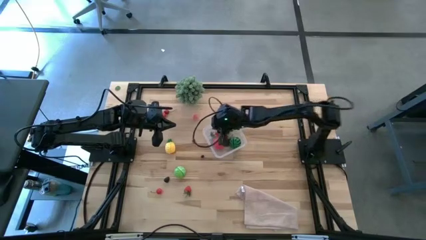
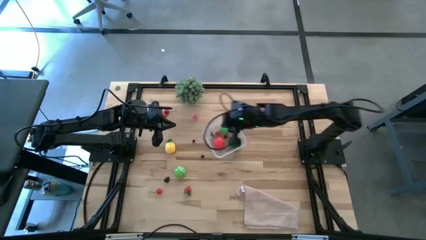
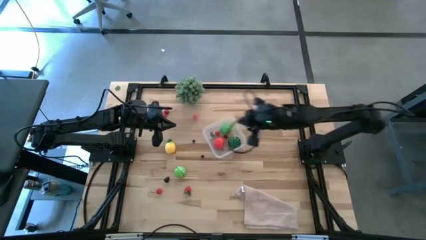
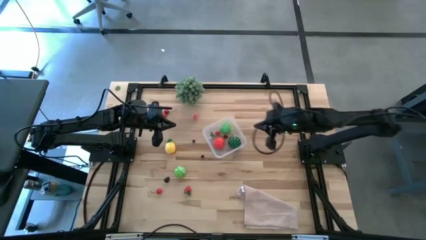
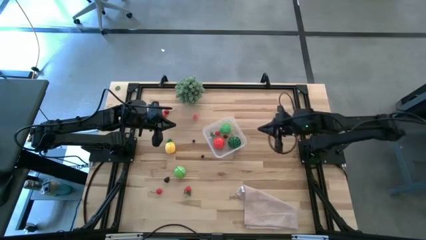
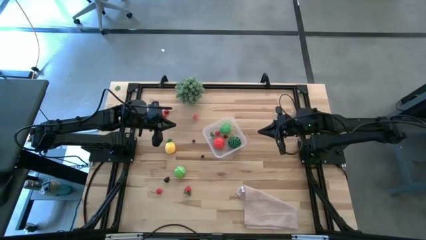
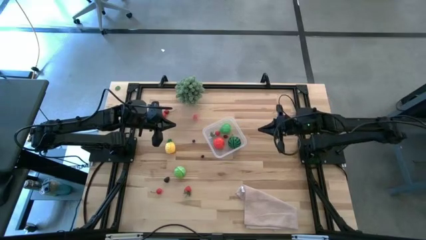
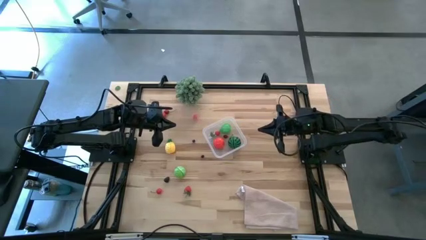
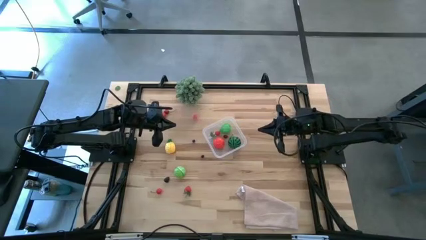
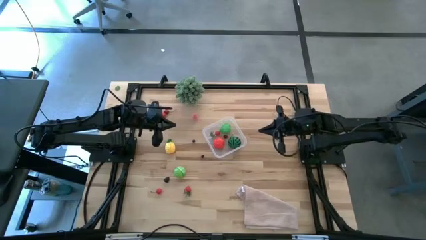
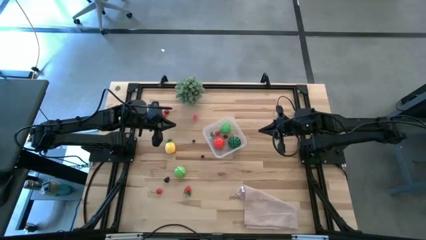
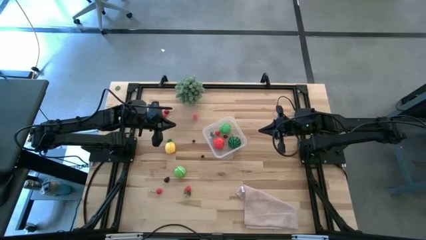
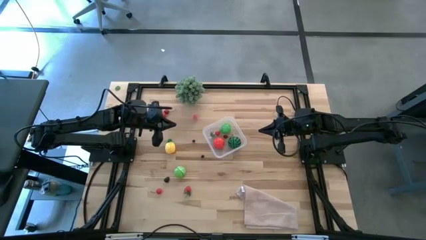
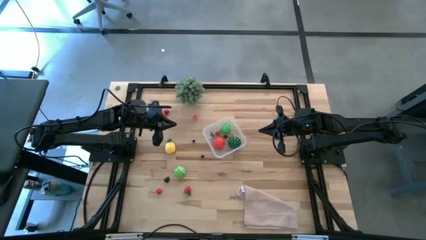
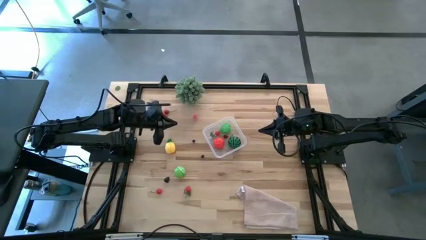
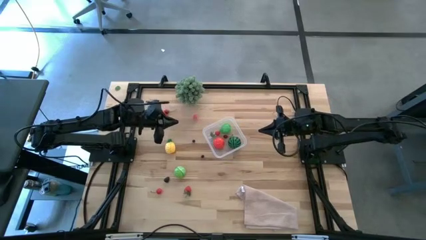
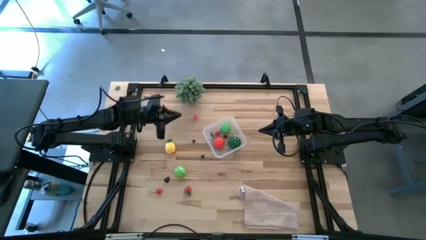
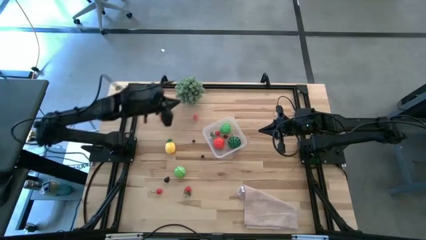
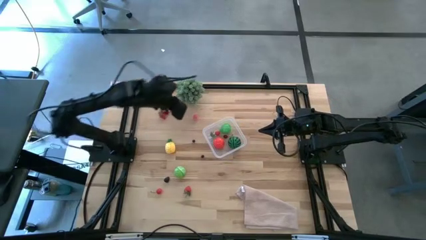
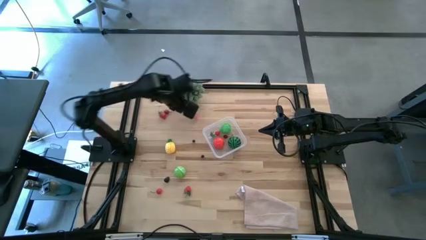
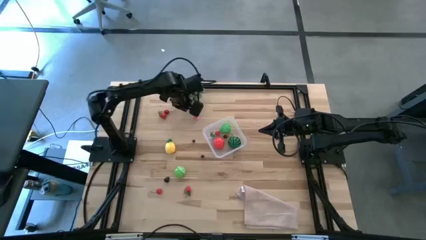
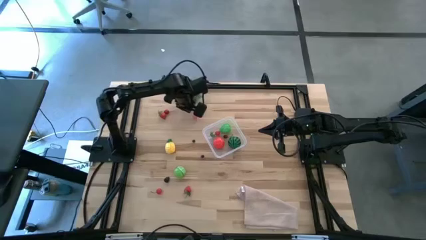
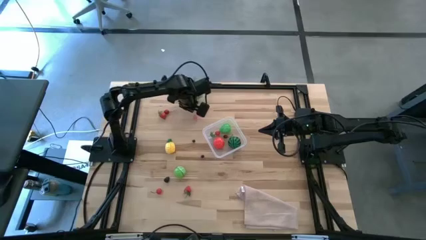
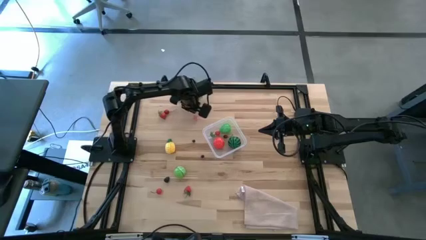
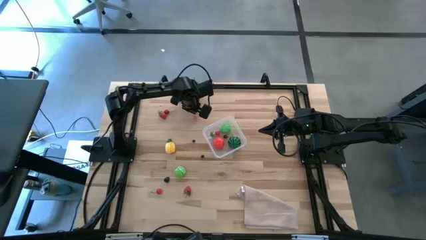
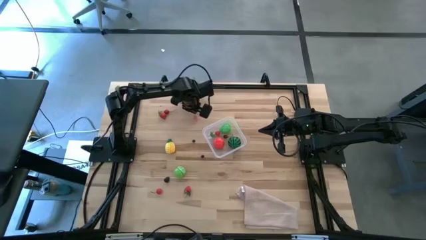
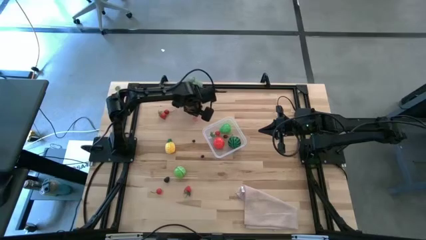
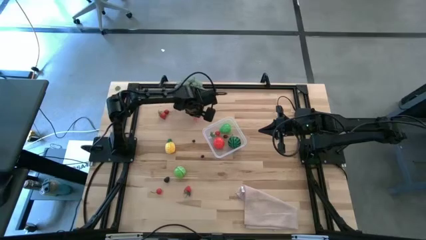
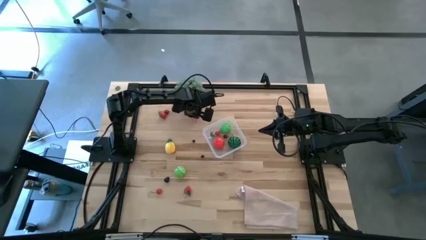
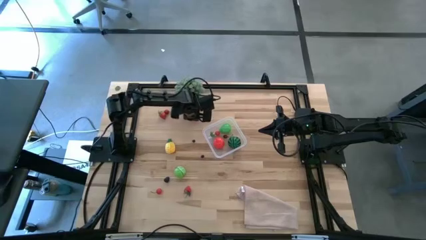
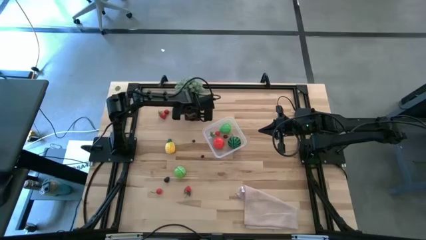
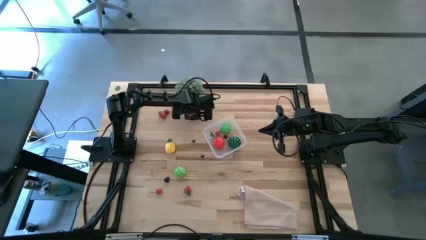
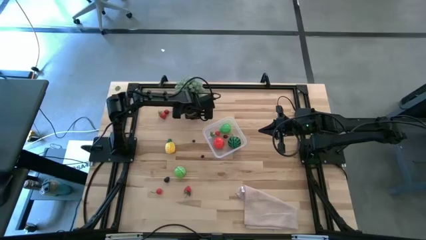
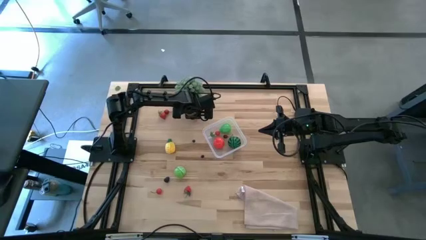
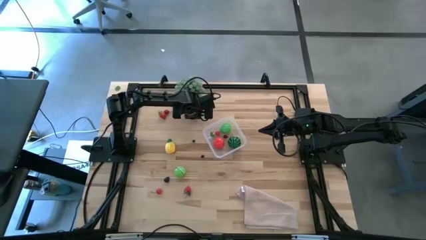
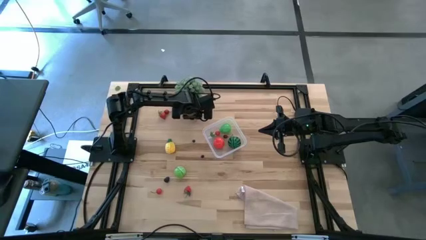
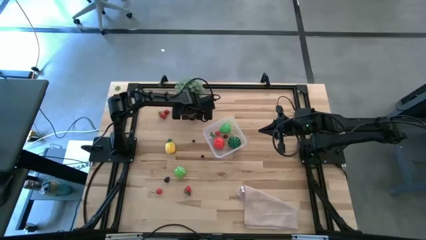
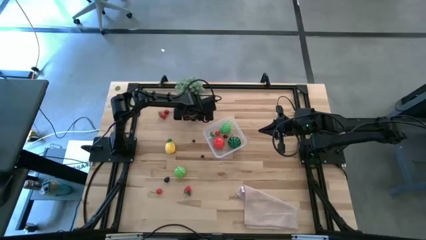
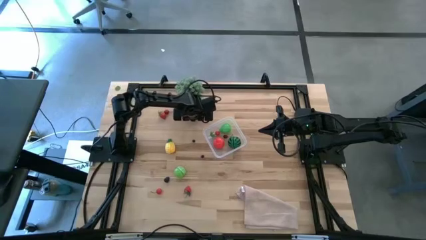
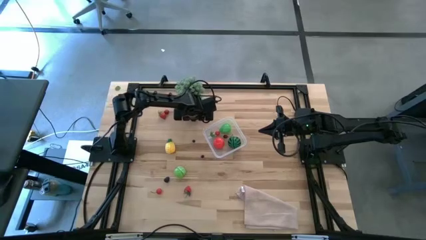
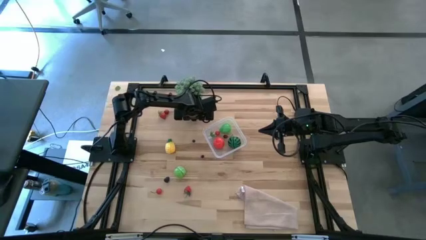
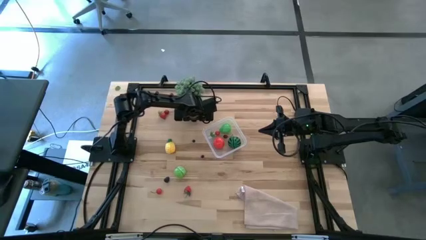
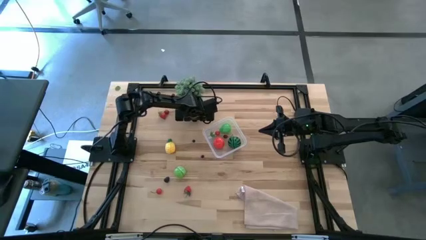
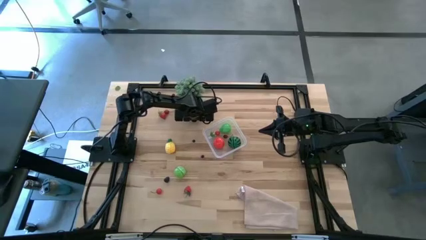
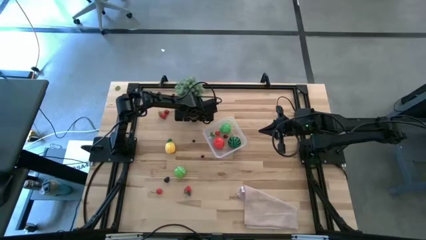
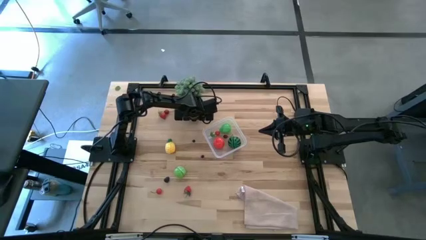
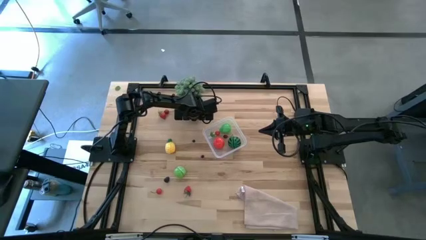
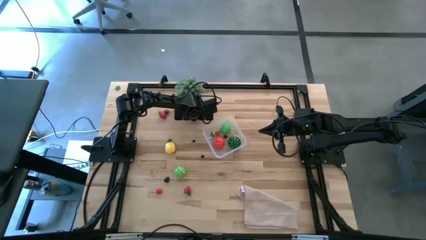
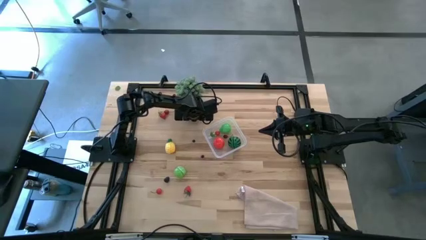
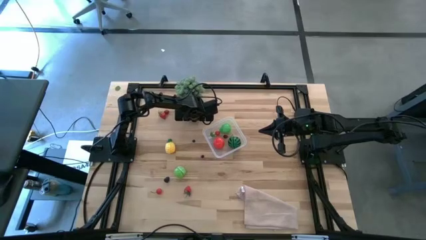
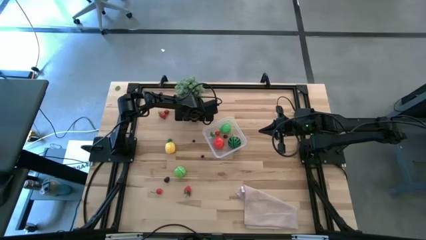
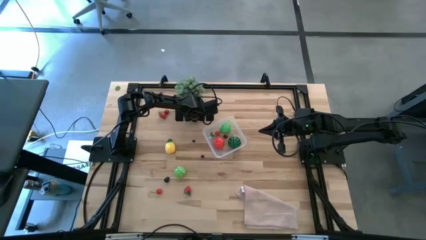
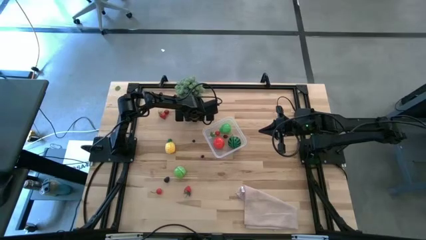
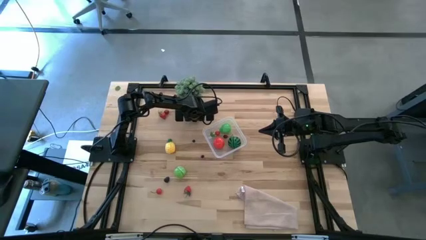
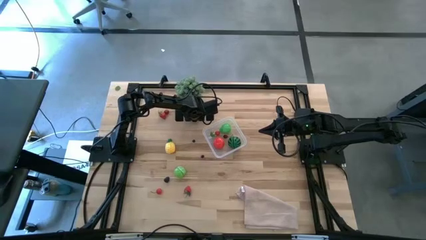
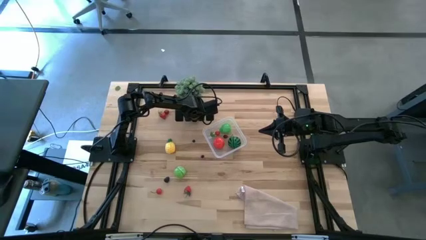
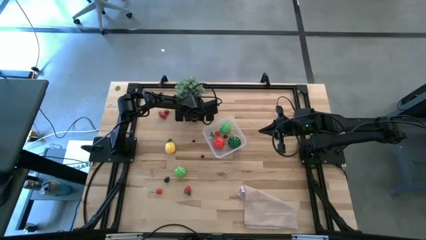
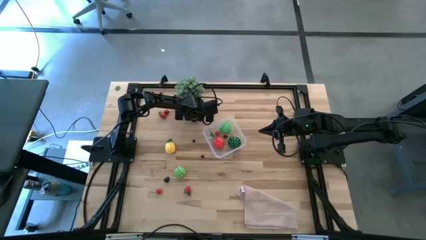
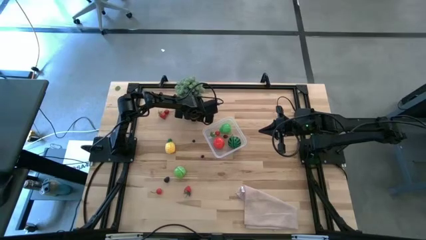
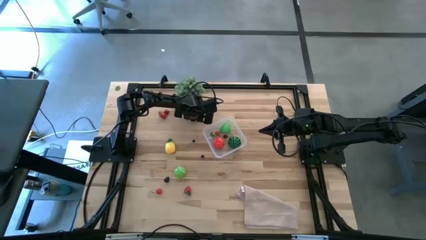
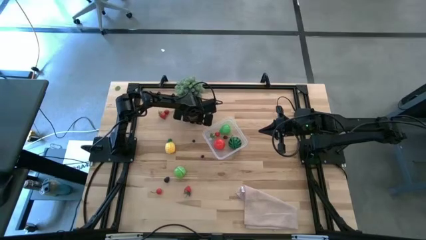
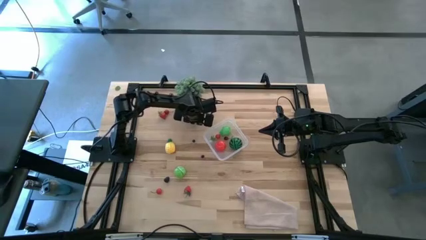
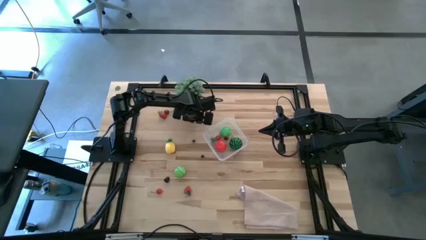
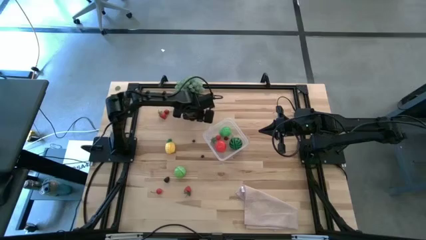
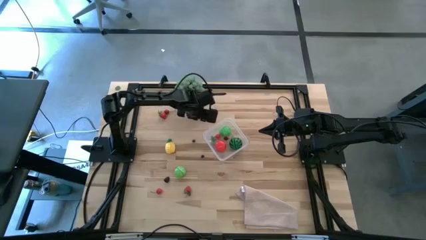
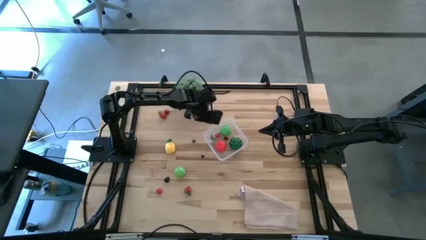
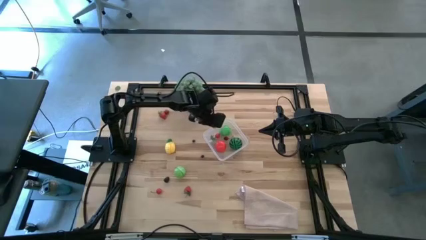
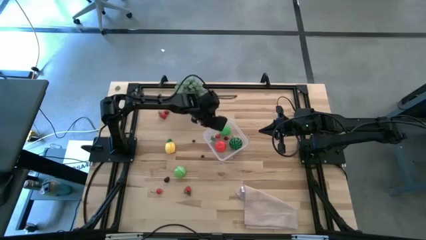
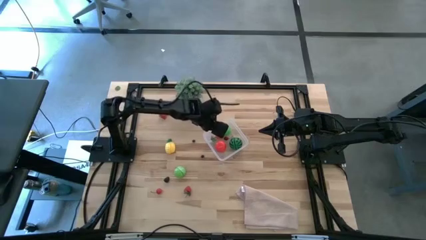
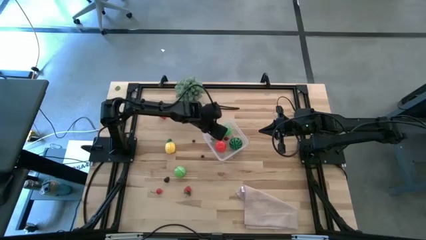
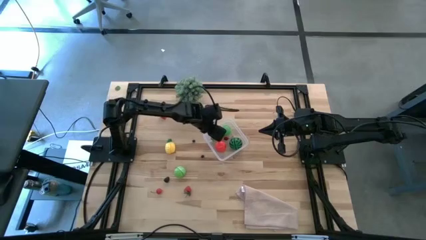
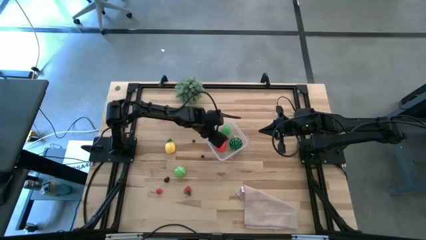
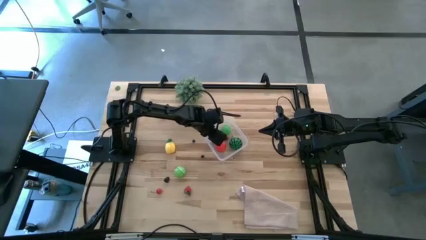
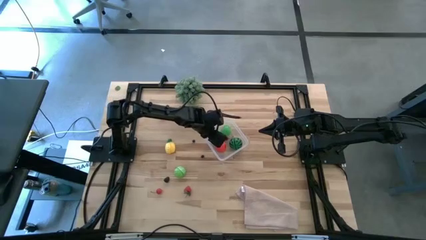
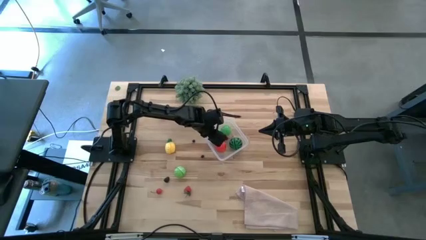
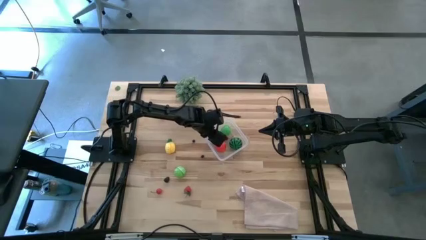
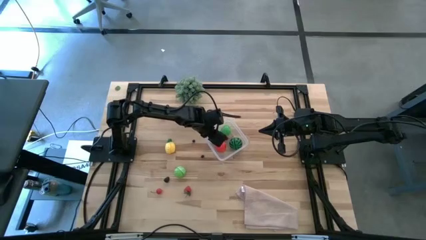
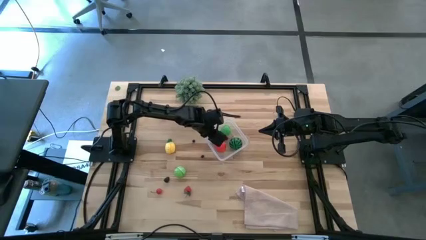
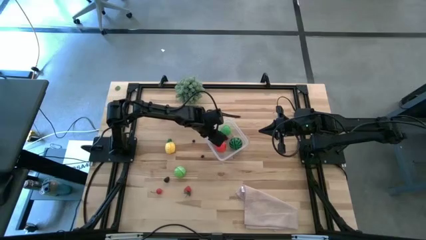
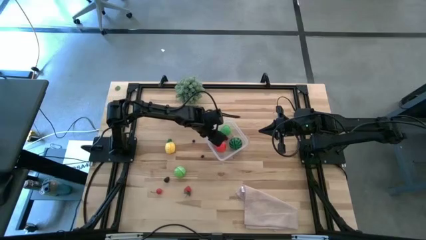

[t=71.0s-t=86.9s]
Task: Pick and placing Produce into tupperware
Put the pink peach into the transparent bin
